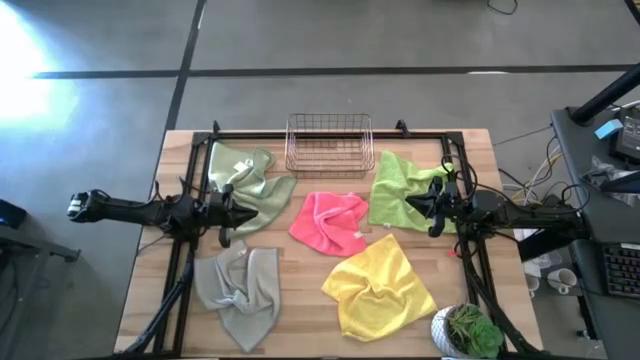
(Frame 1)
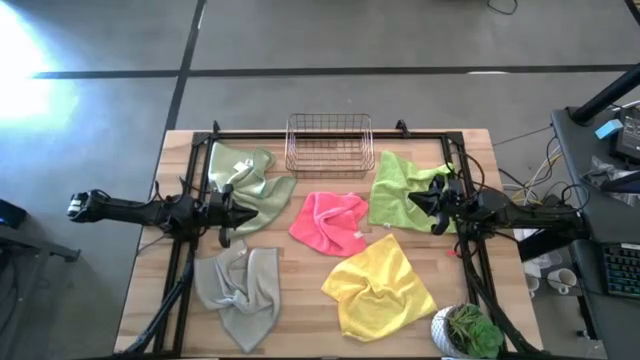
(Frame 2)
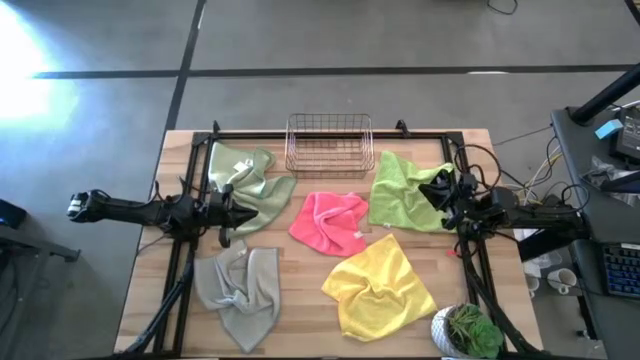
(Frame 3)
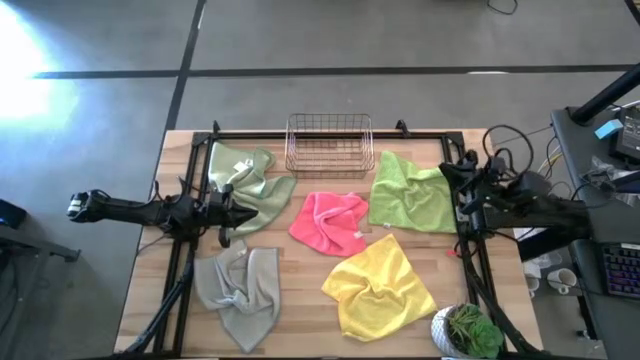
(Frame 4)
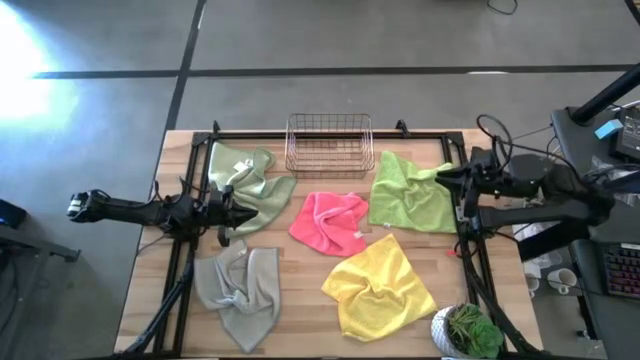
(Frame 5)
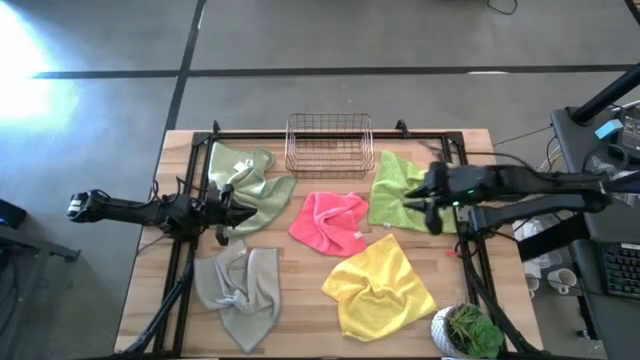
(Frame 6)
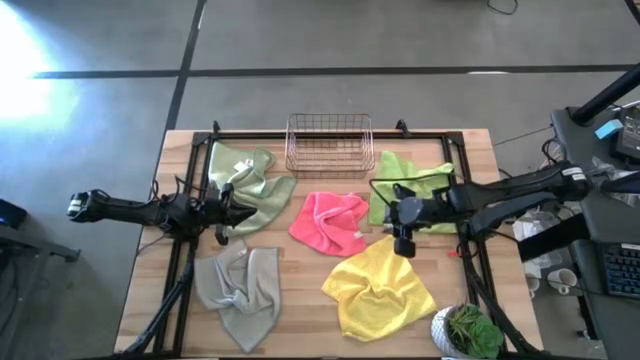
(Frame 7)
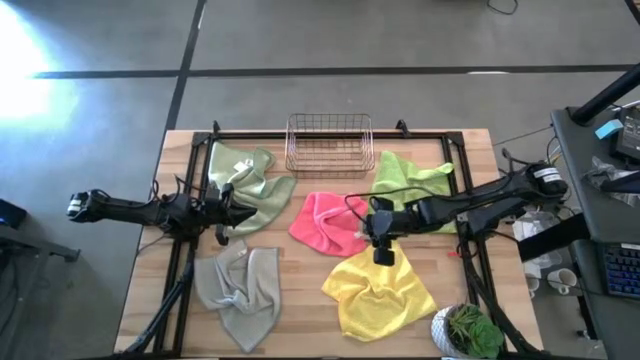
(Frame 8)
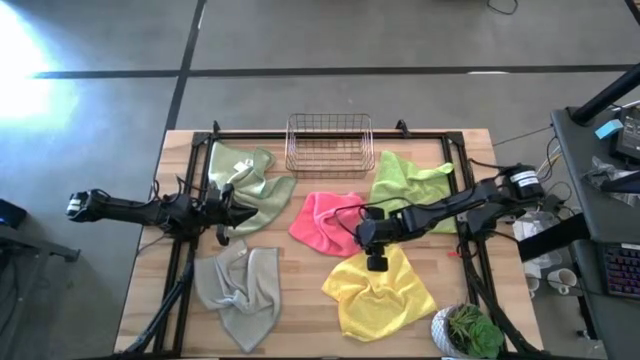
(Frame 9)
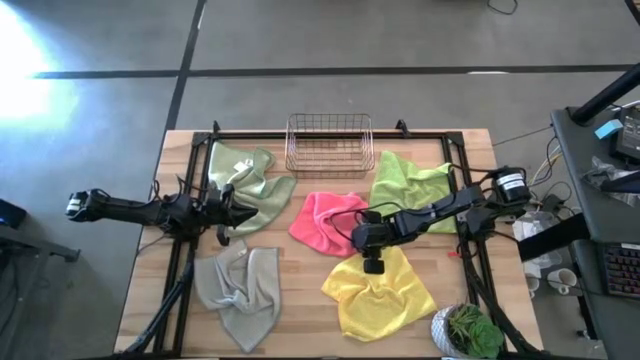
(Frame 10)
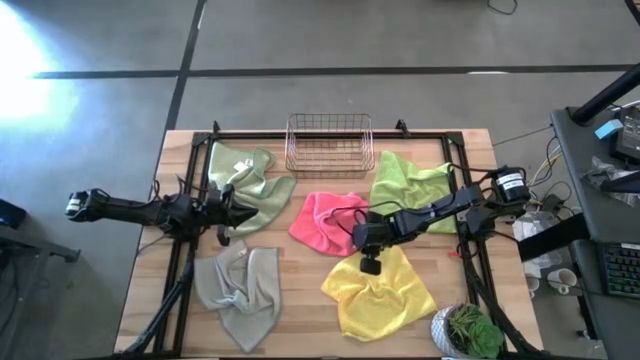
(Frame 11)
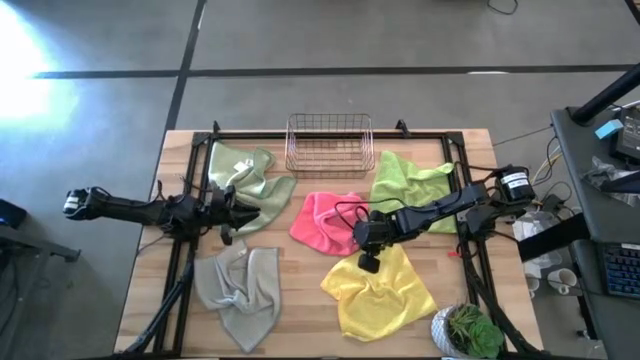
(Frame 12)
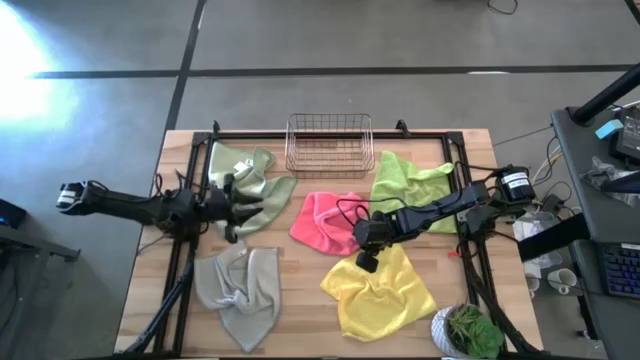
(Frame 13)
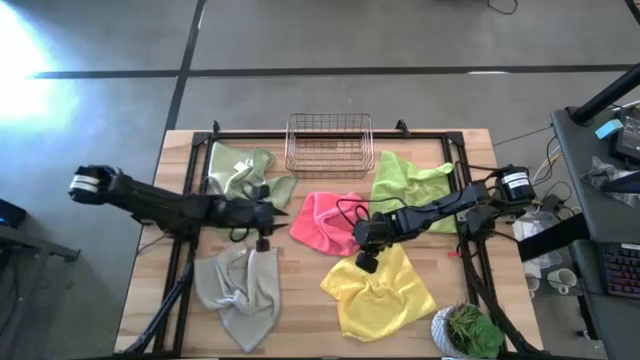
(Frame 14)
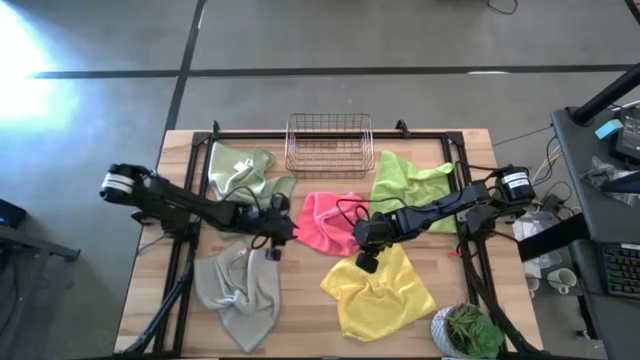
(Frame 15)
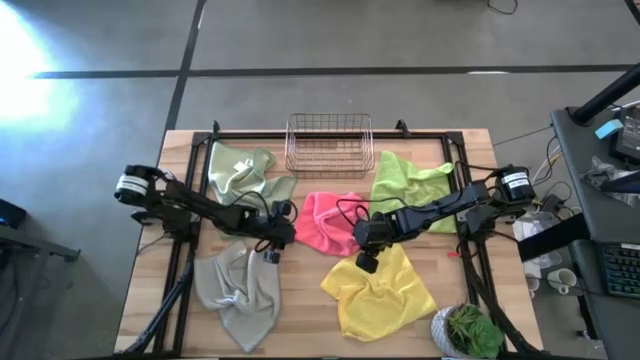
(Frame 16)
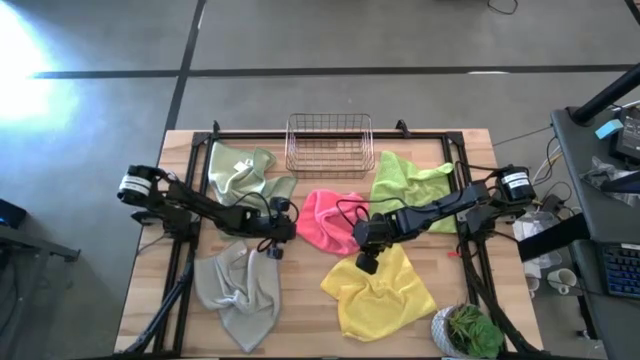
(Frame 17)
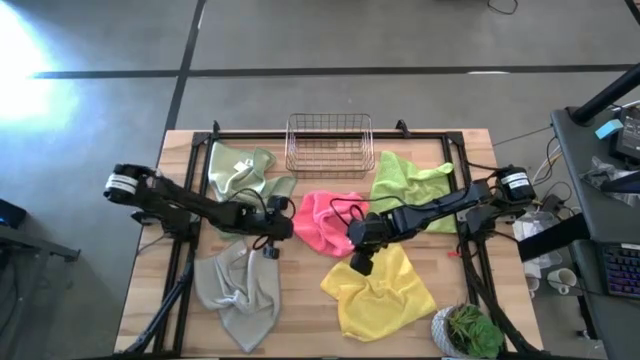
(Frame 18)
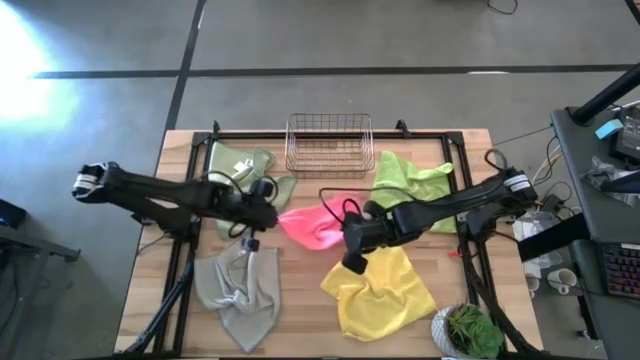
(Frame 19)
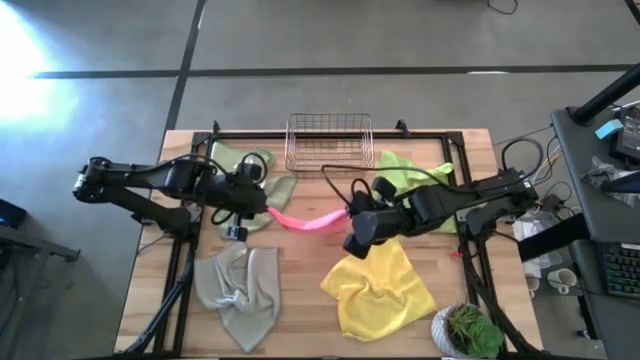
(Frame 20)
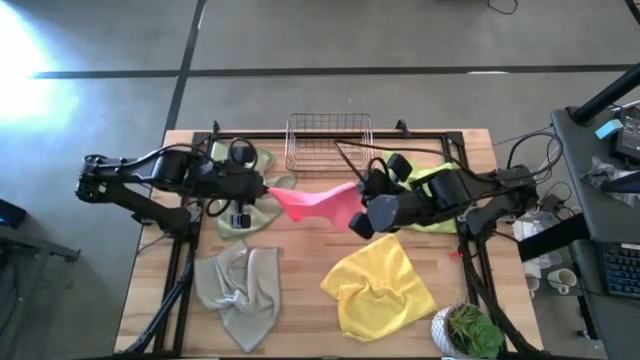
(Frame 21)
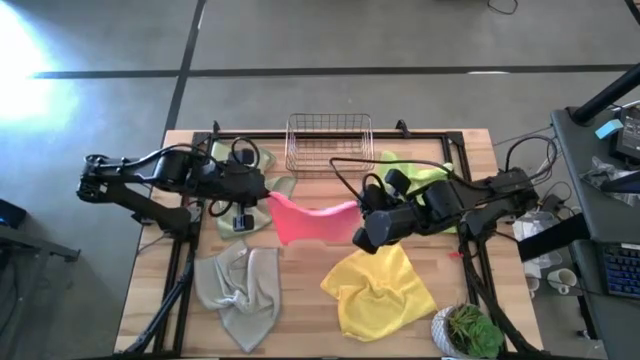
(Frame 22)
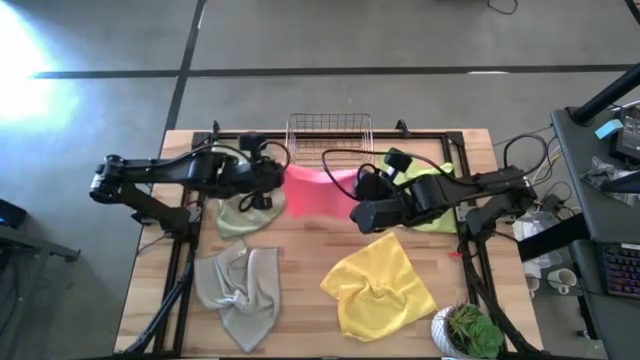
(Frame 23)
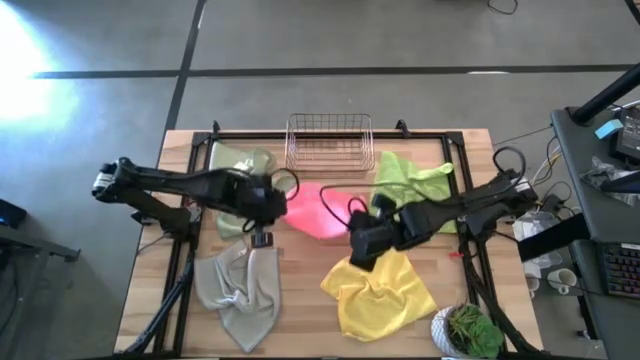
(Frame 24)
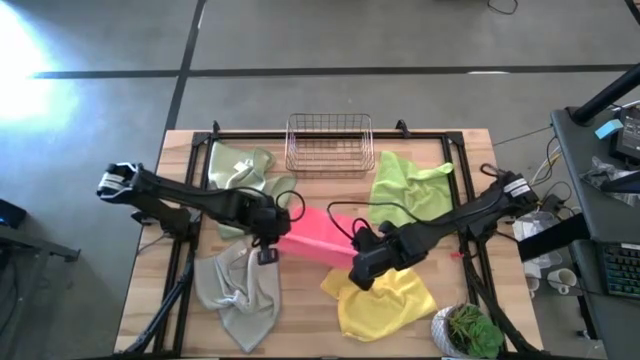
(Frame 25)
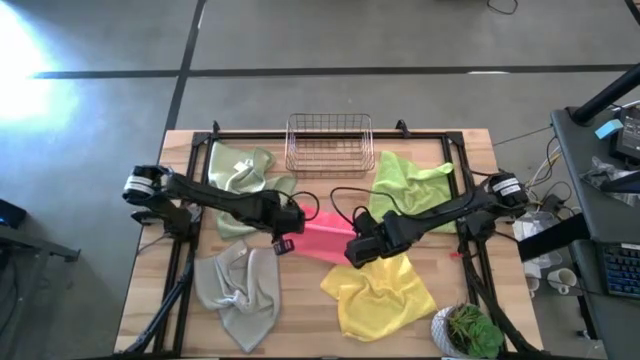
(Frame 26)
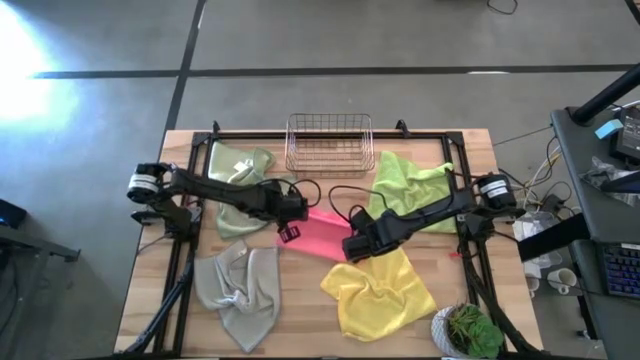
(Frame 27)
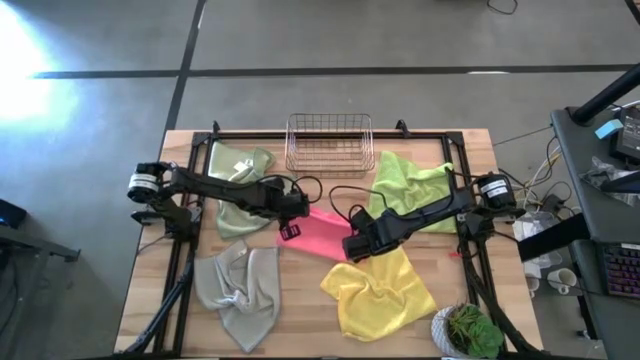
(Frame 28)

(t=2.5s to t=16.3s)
Task: Fold microfiber towels
Fold the pink microfiber cloth

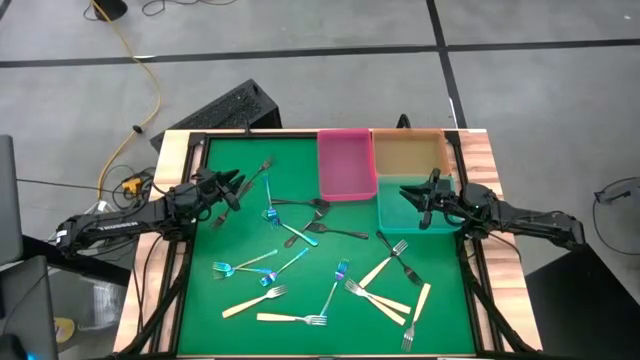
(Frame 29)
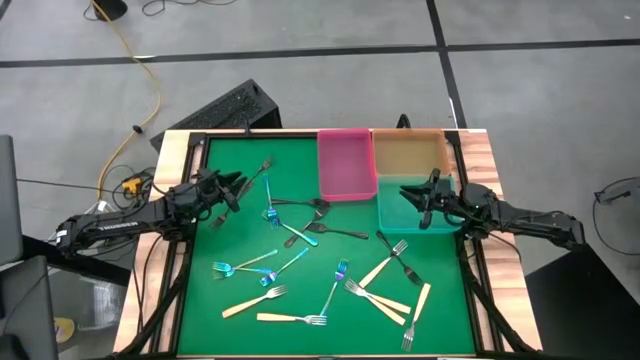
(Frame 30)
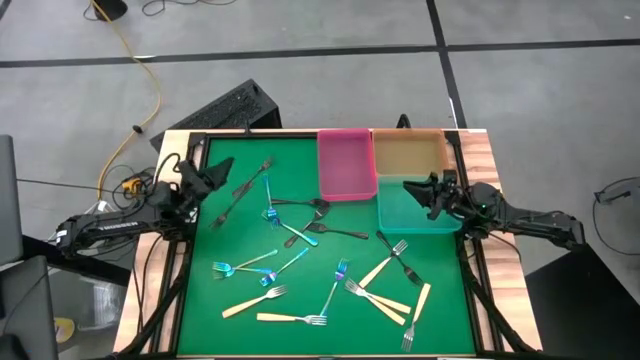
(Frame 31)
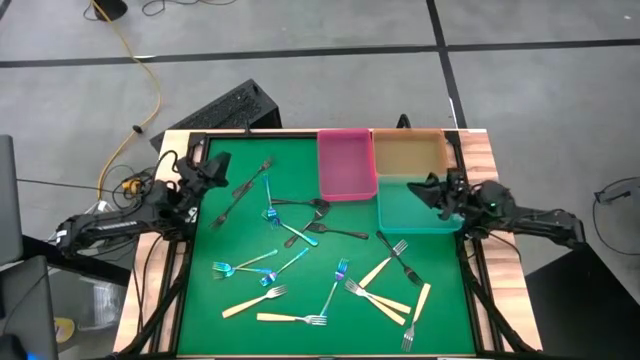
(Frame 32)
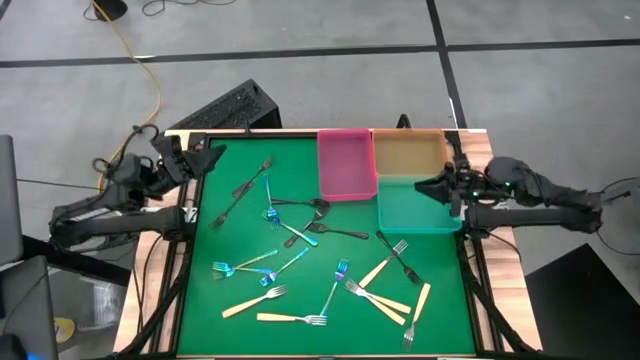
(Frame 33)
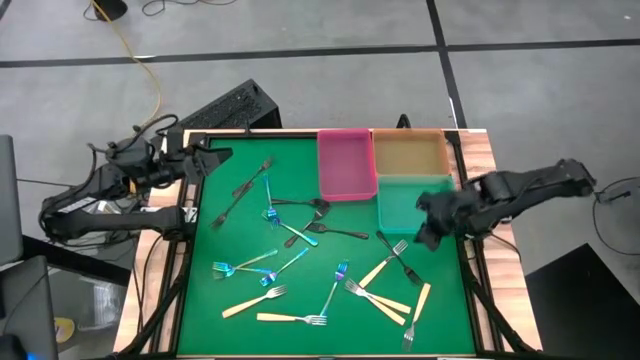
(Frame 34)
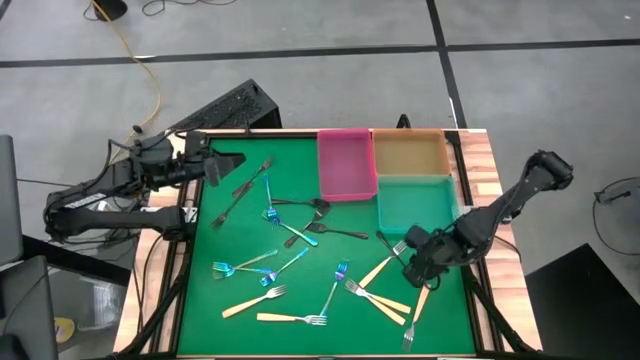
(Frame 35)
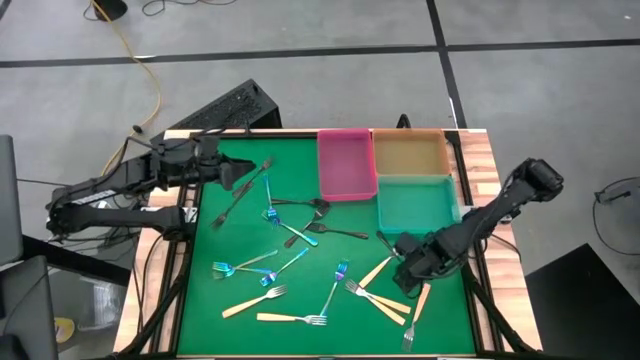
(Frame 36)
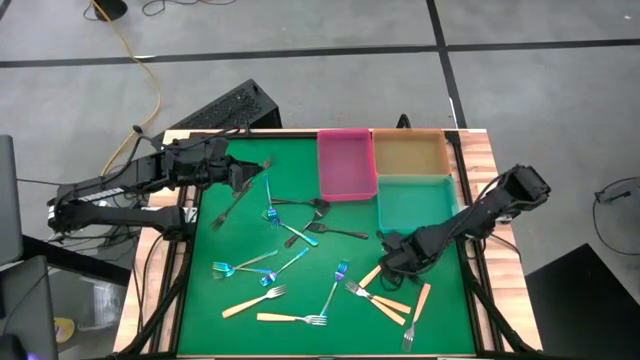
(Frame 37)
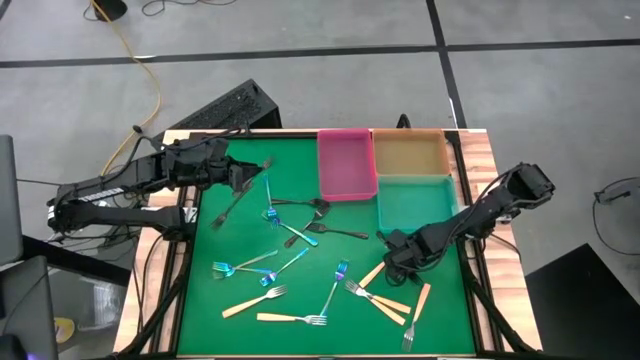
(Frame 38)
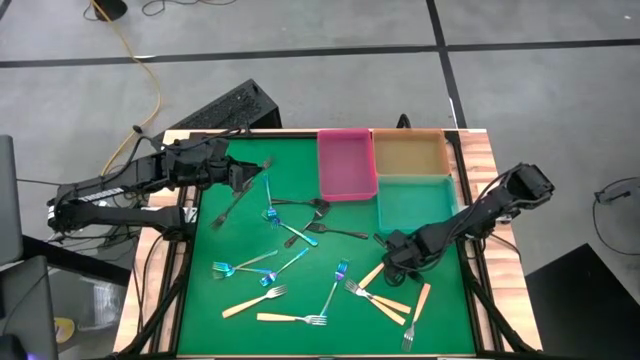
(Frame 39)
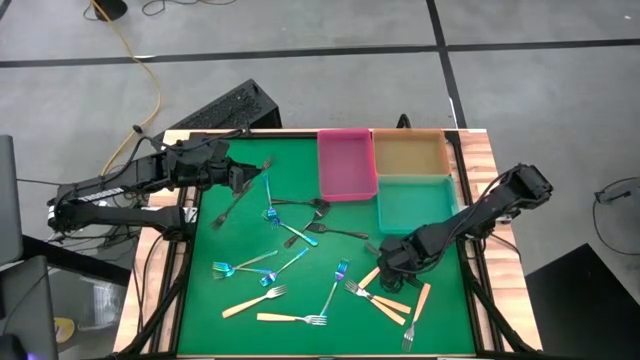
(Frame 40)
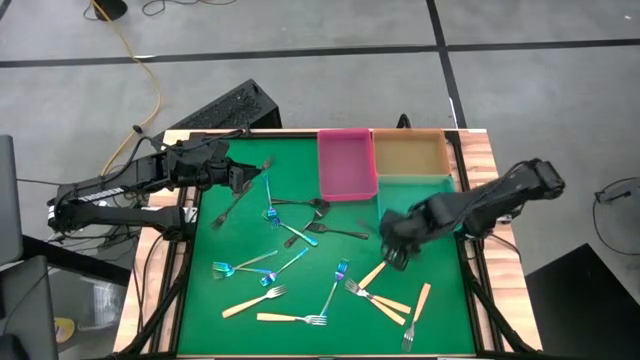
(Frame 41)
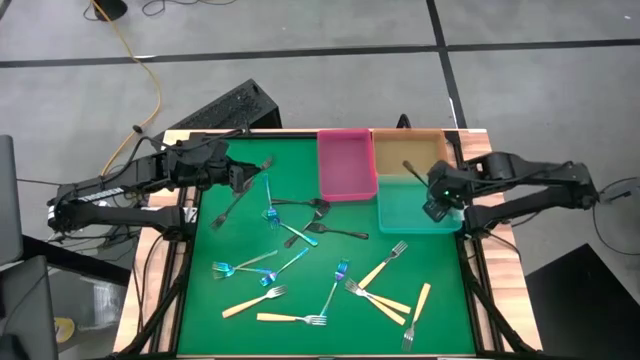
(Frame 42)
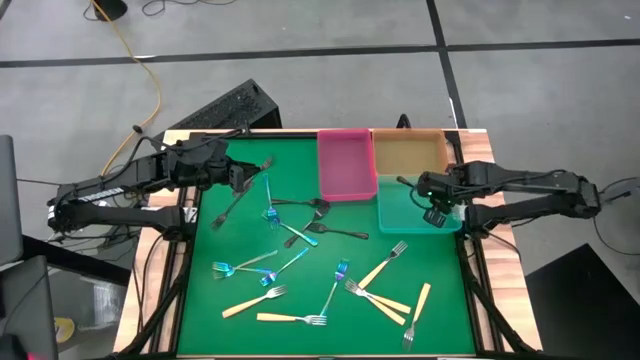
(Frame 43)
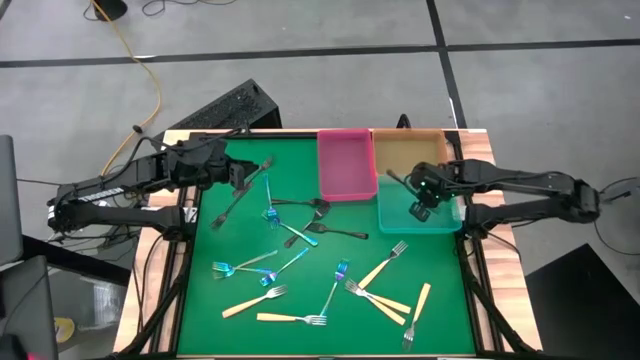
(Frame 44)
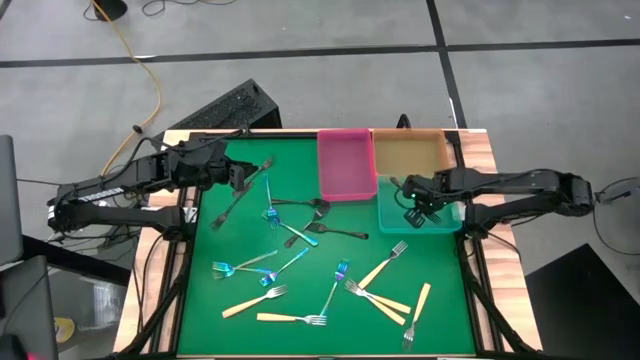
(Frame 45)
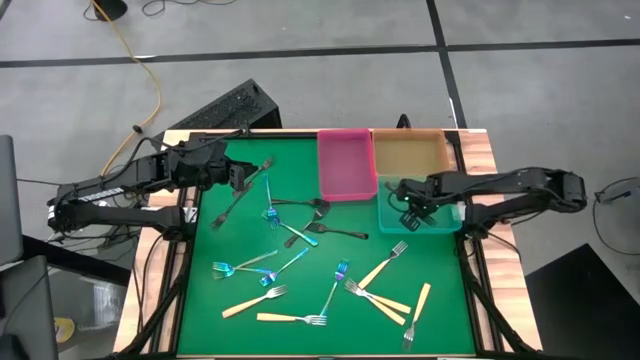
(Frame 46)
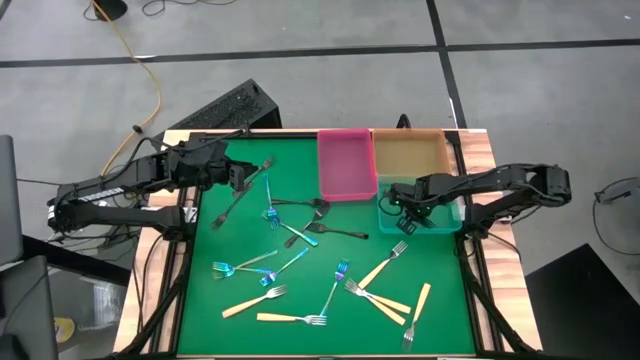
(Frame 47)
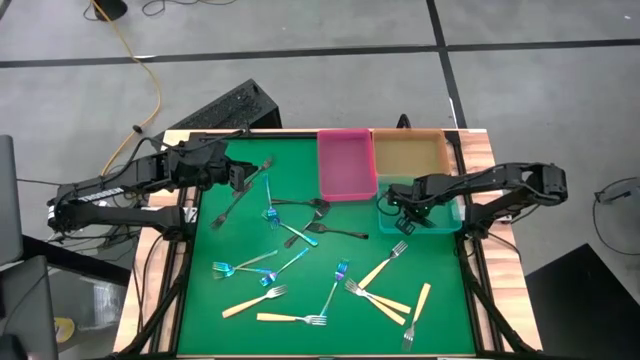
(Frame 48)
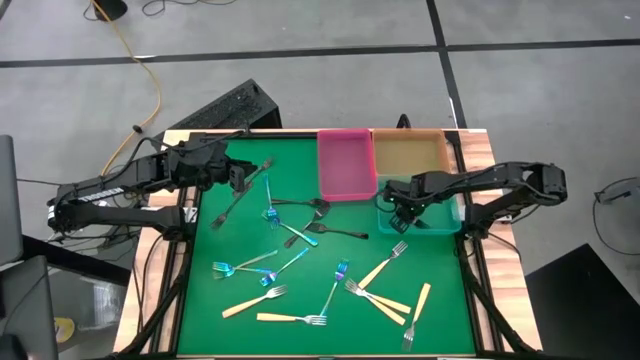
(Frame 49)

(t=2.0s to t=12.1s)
Task: Sort silverware by color (type)
Put the black fork into the blue bin
